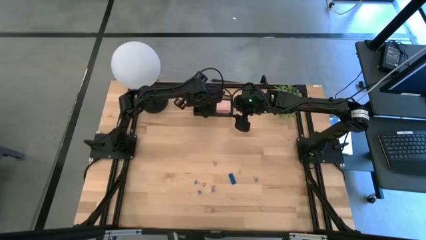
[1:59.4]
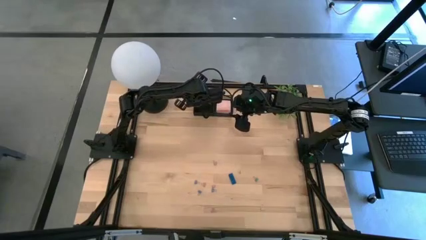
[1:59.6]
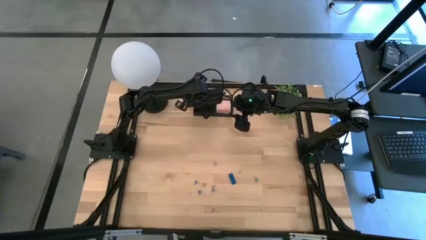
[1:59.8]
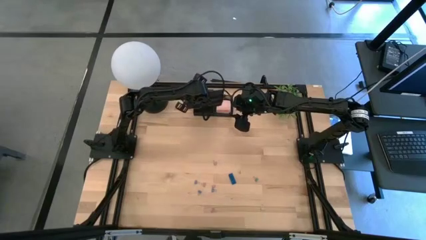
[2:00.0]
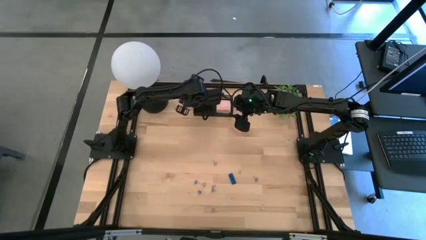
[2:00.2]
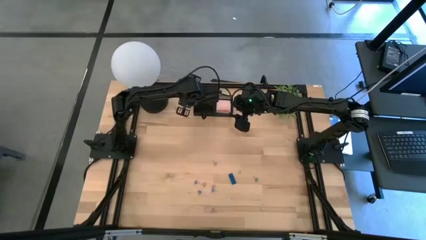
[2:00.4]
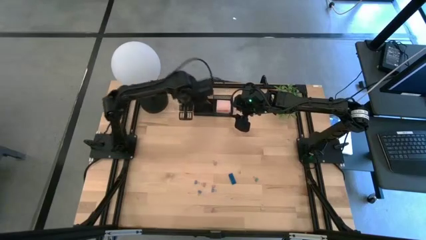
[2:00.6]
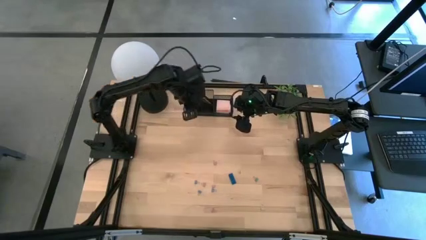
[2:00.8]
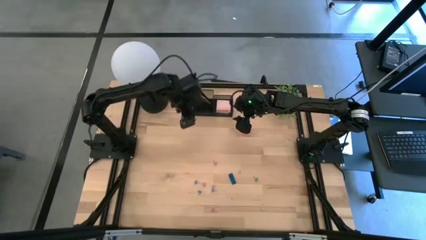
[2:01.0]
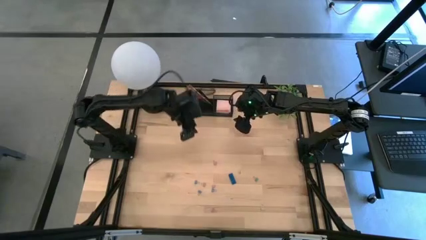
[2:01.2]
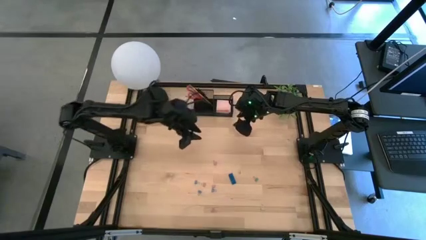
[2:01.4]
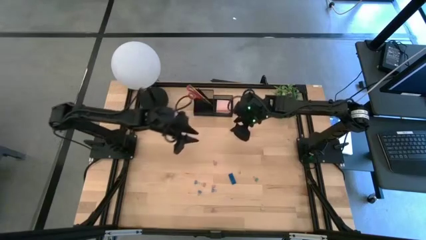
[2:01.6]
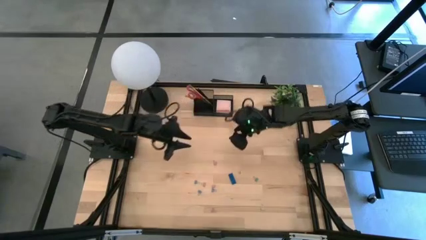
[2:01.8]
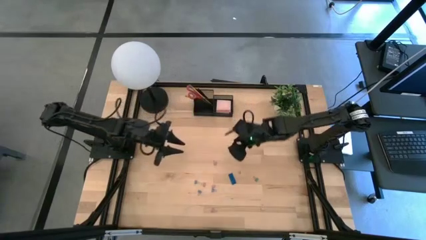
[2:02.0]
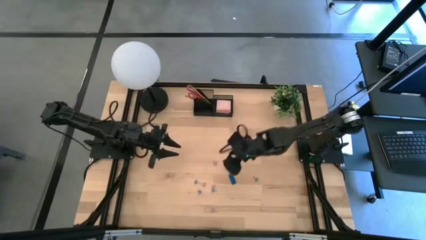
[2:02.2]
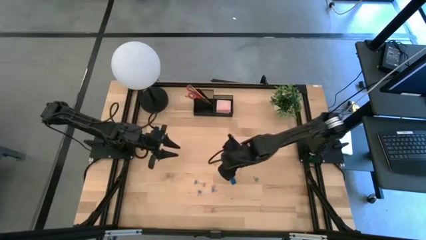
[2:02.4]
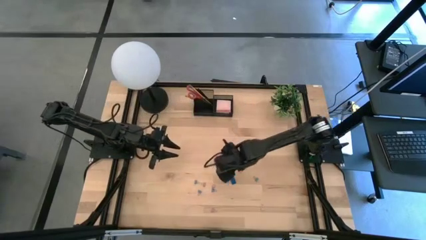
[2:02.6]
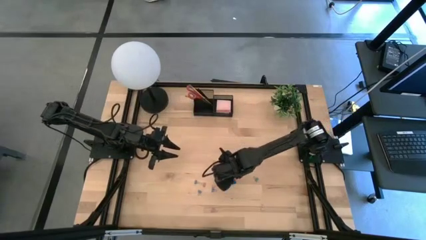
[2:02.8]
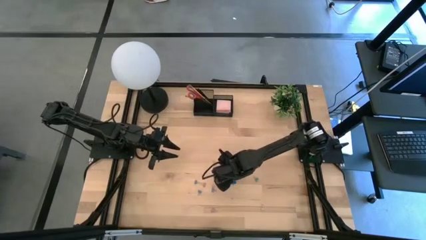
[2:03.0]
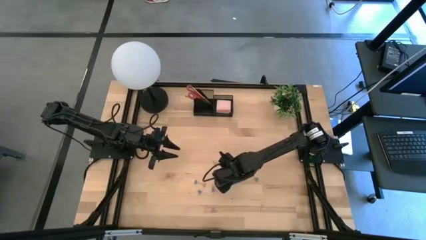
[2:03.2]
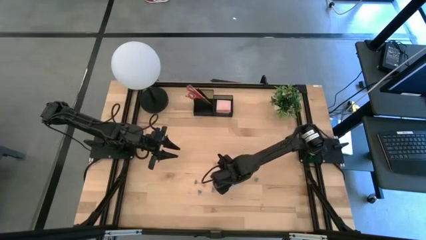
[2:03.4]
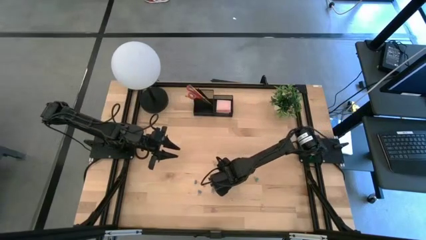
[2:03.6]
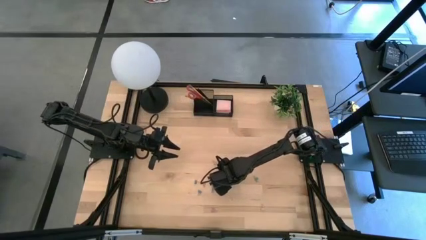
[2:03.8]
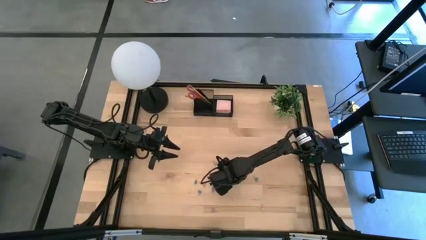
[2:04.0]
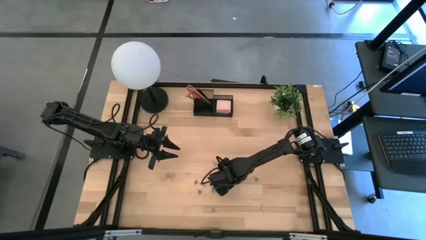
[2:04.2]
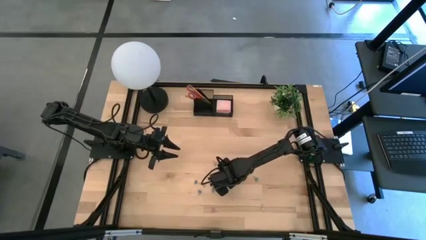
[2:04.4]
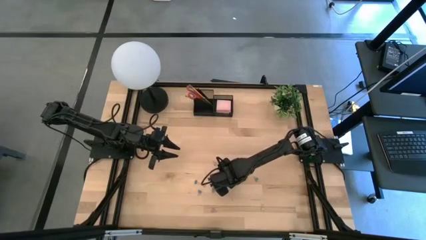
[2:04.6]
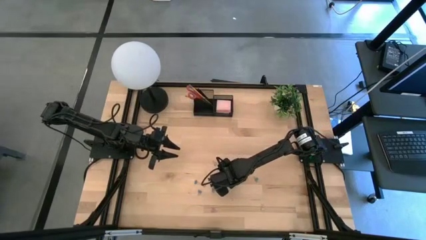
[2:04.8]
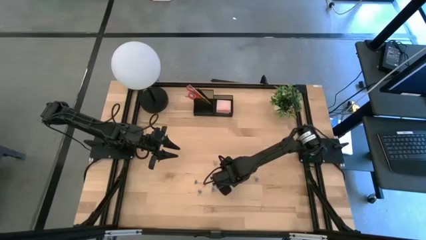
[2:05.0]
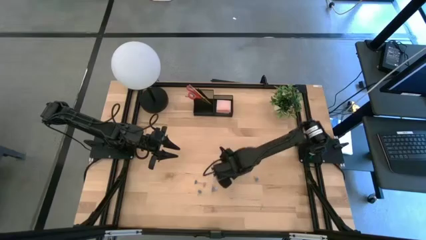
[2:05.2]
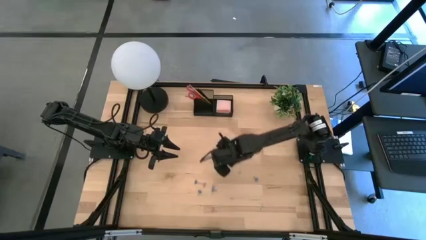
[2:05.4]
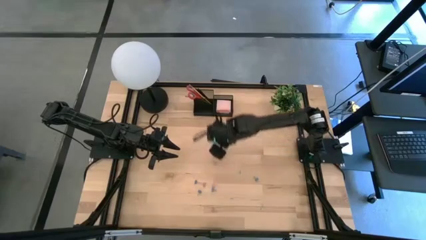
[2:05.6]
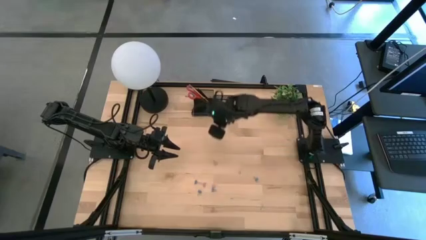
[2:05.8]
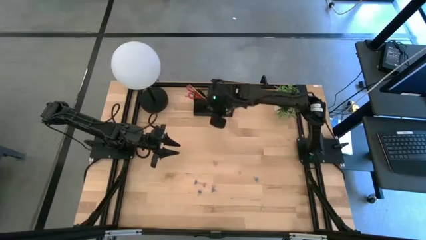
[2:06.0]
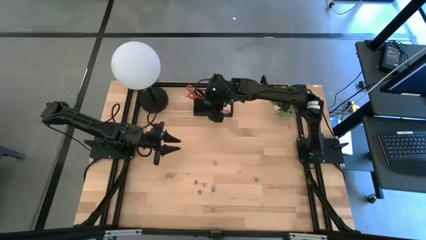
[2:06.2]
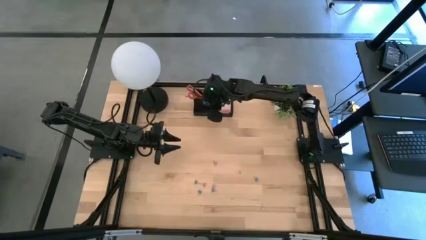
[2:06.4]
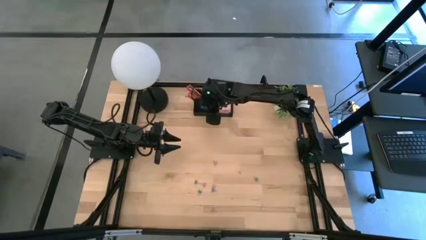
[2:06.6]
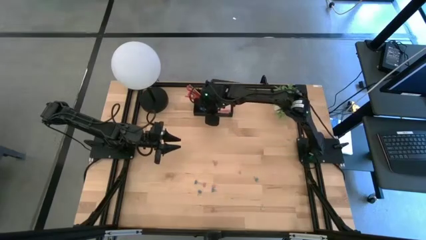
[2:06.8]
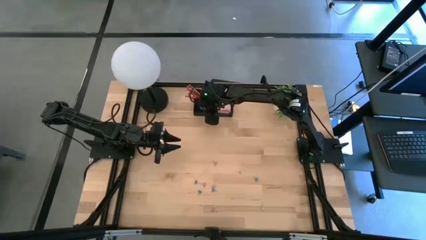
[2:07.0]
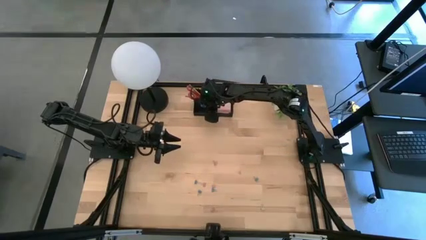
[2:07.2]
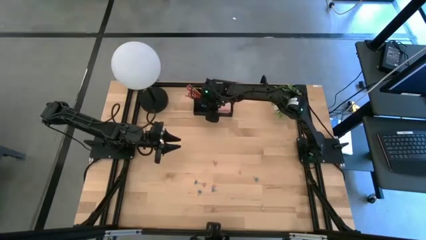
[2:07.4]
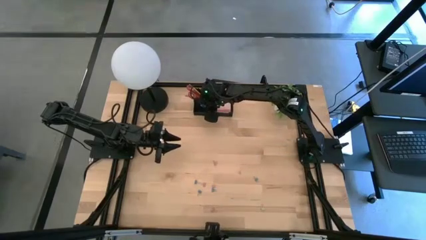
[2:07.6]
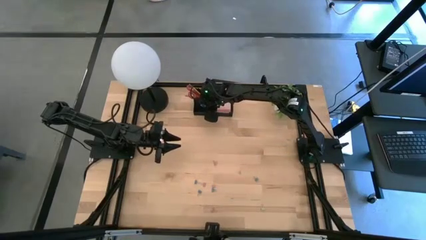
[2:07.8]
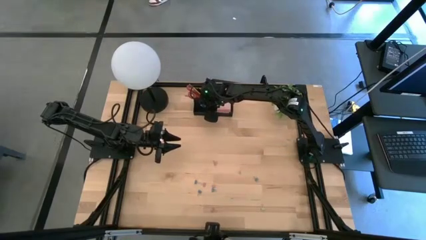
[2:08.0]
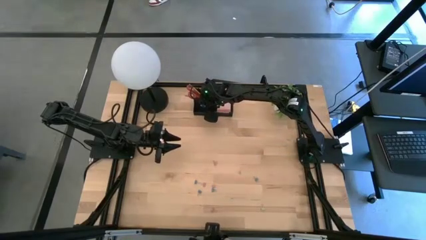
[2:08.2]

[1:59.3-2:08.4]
Task: Pick and place office supplies into organizer
Put the blue eraser into the black desk organizer
